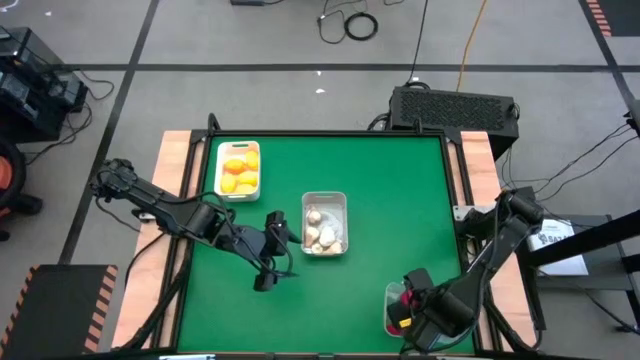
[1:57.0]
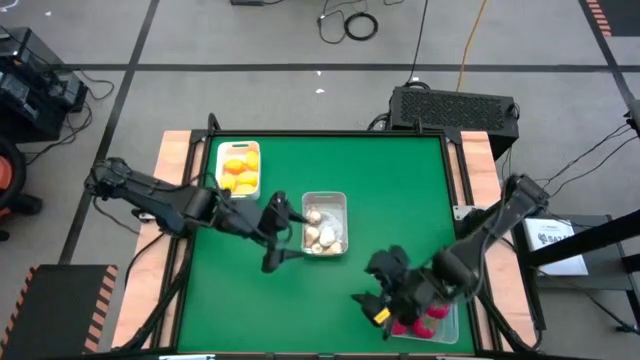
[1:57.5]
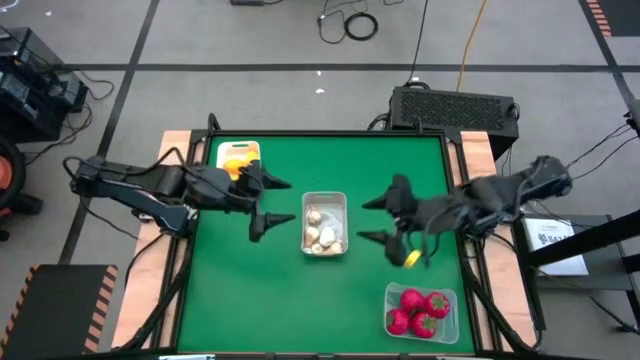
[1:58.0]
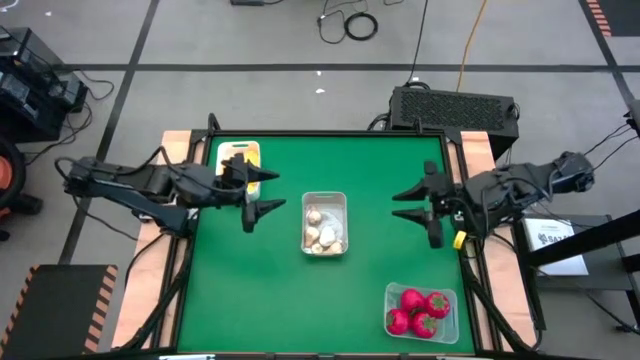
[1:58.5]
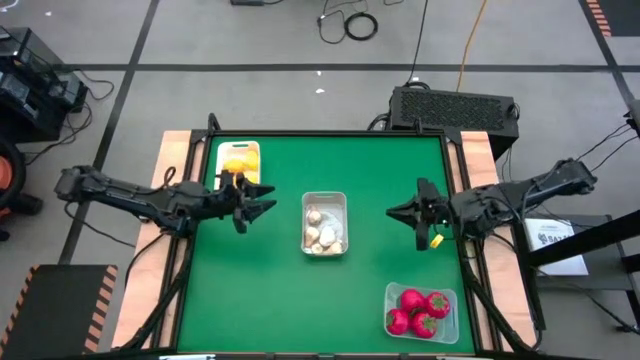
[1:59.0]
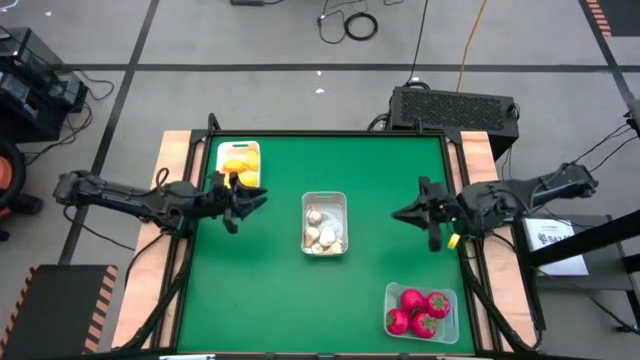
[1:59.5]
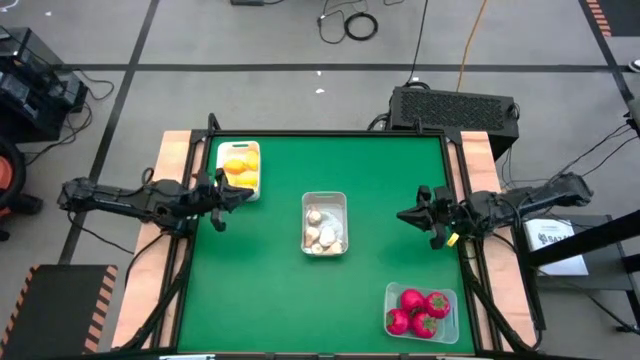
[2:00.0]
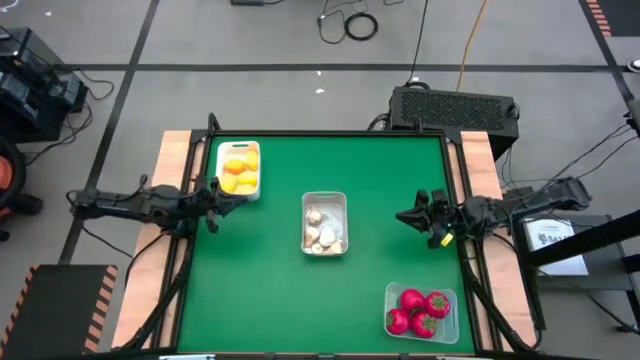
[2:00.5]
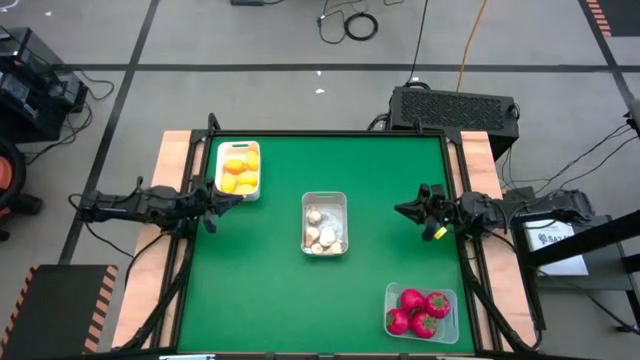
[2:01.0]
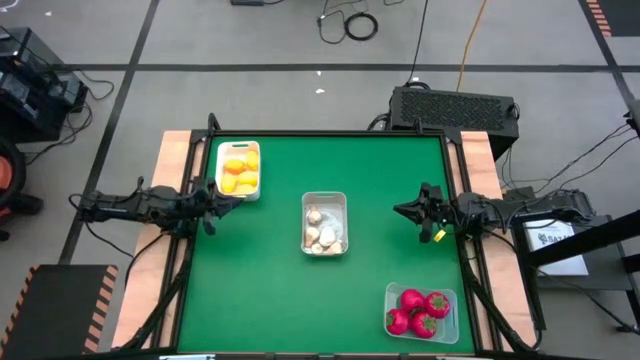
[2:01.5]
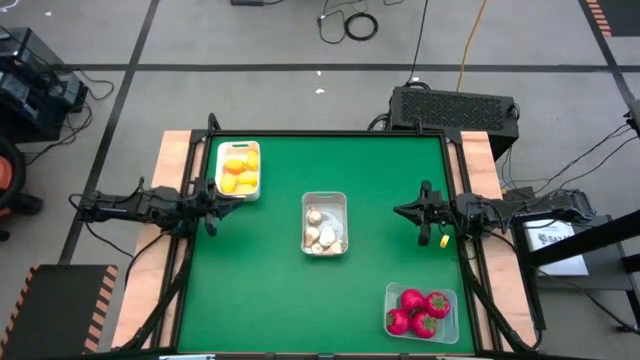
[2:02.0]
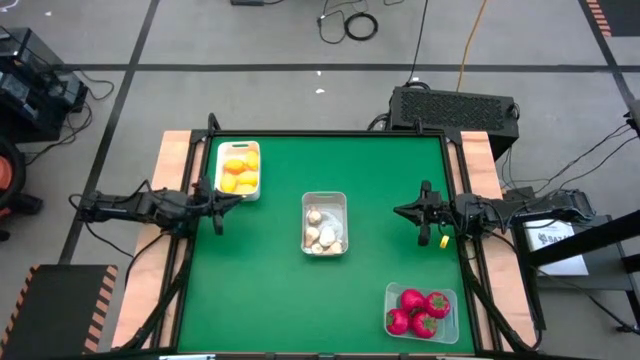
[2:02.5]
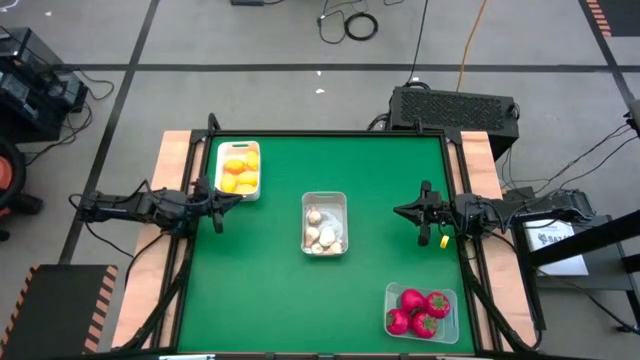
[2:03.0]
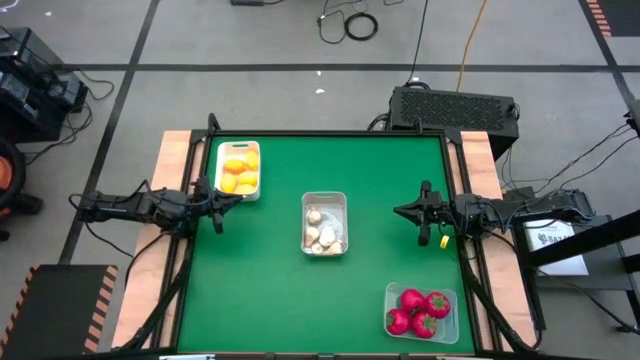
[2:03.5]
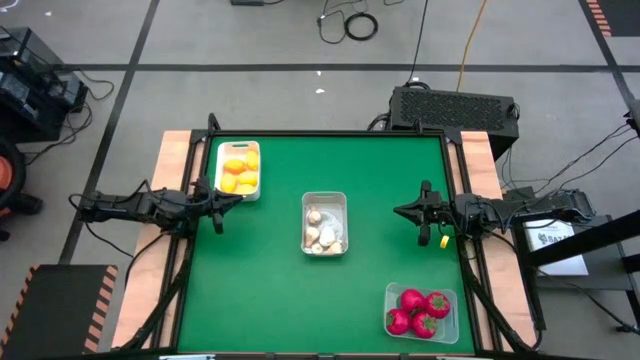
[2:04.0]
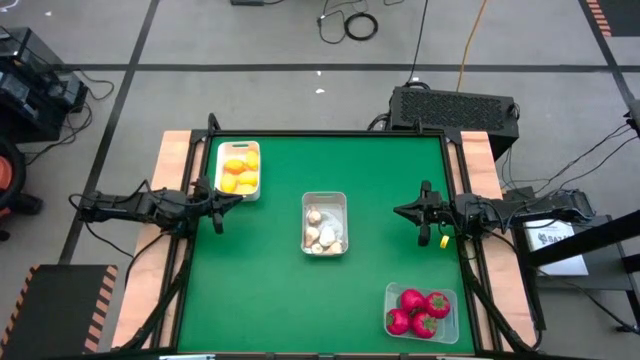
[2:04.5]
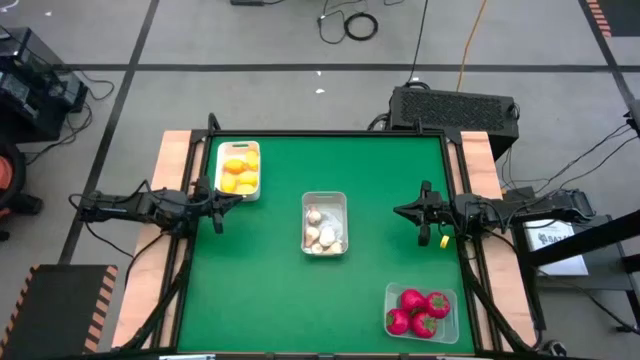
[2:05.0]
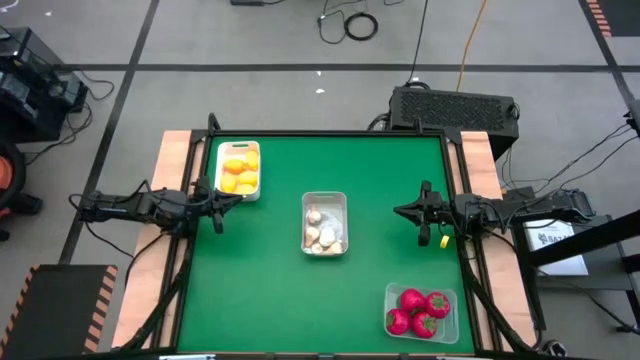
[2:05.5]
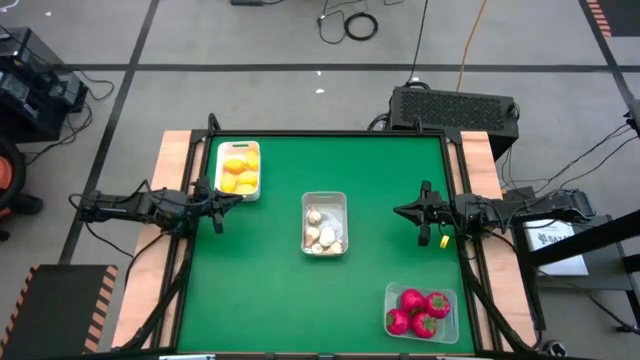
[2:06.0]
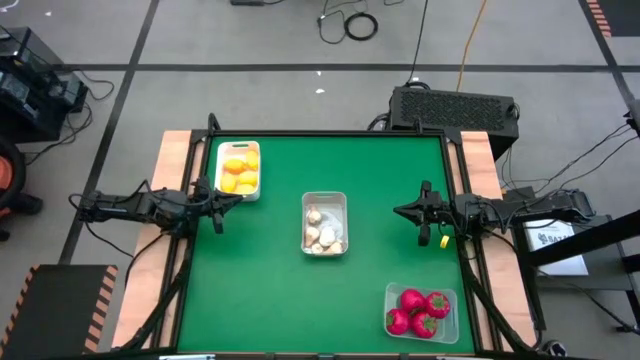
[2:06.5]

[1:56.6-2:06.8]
Task: Sort produce into baskets
Return to Home Position

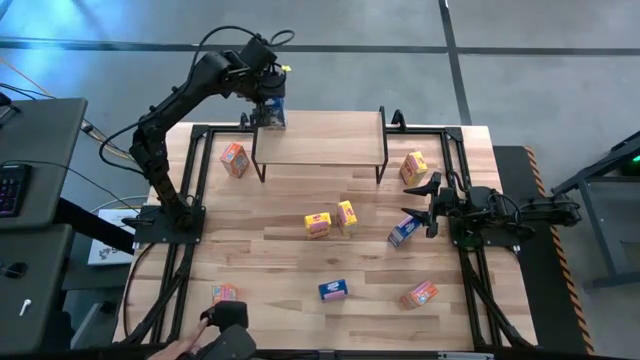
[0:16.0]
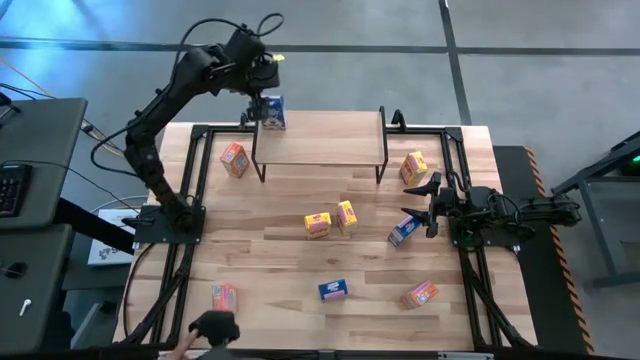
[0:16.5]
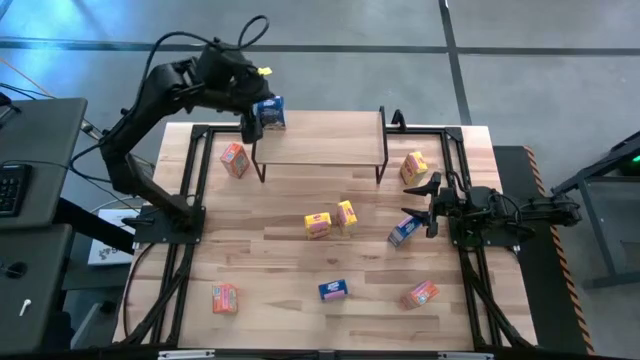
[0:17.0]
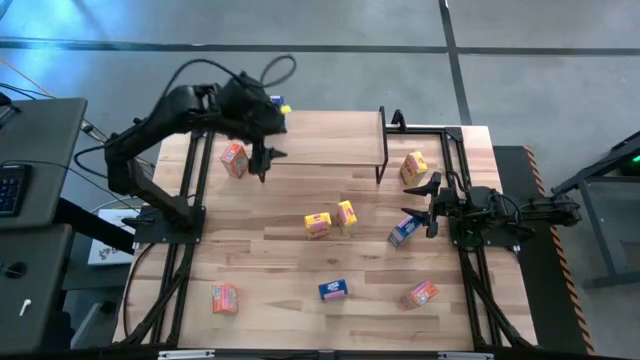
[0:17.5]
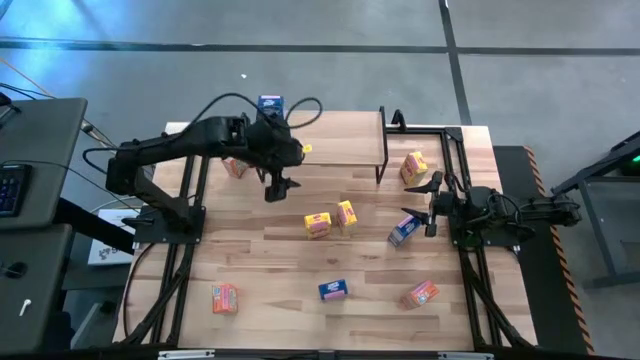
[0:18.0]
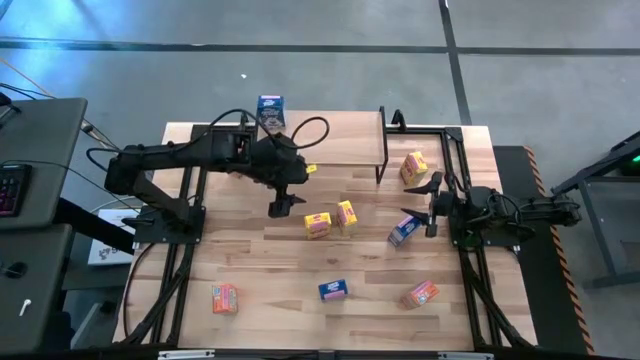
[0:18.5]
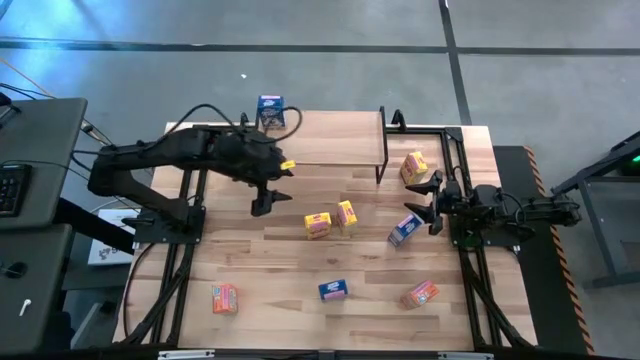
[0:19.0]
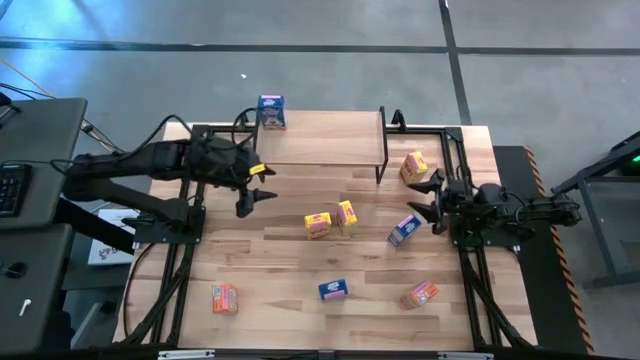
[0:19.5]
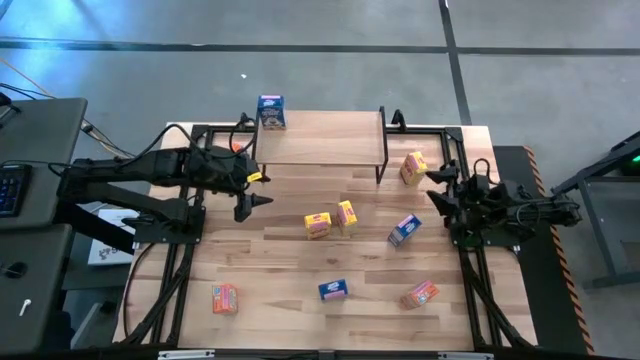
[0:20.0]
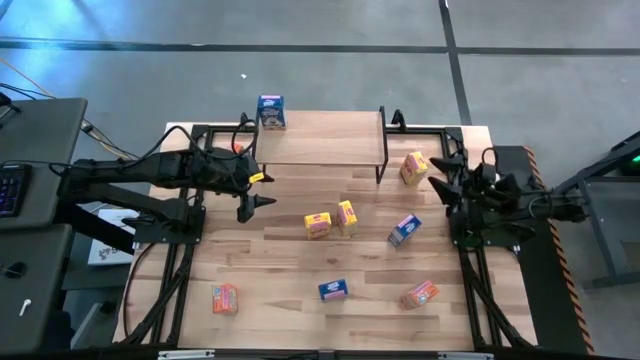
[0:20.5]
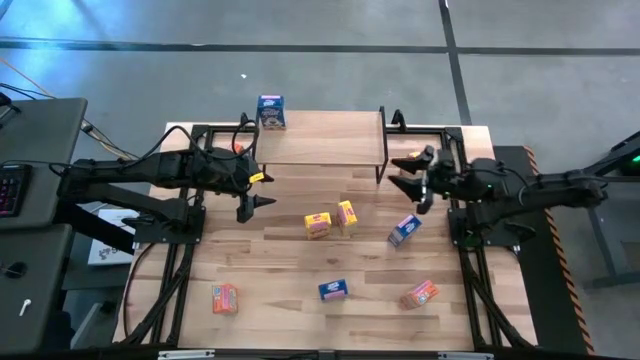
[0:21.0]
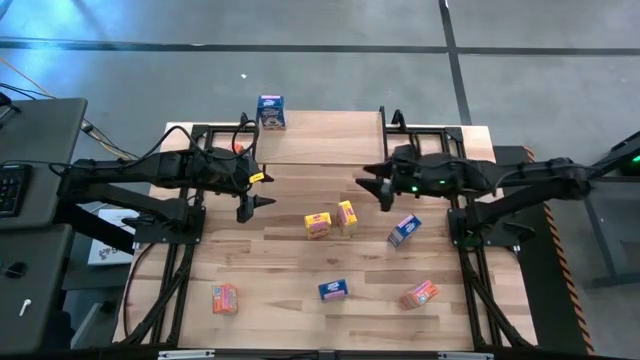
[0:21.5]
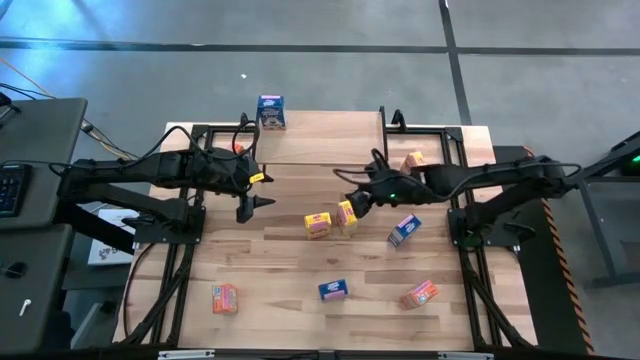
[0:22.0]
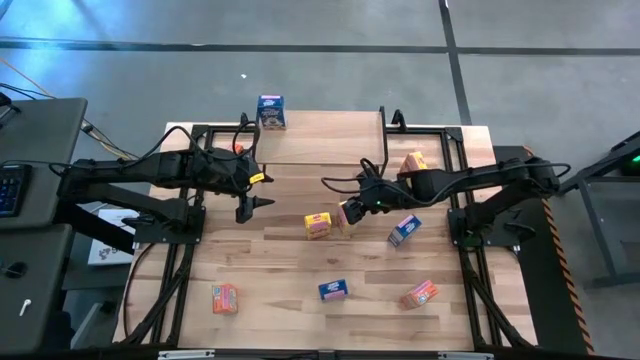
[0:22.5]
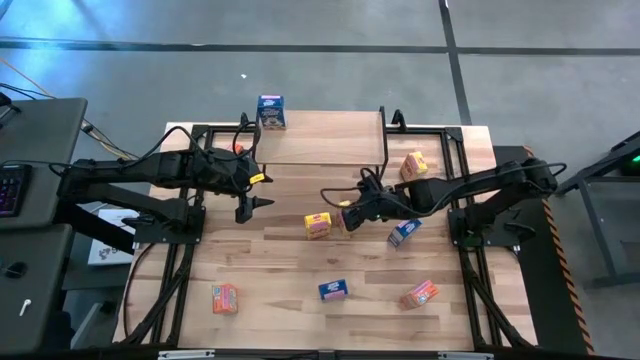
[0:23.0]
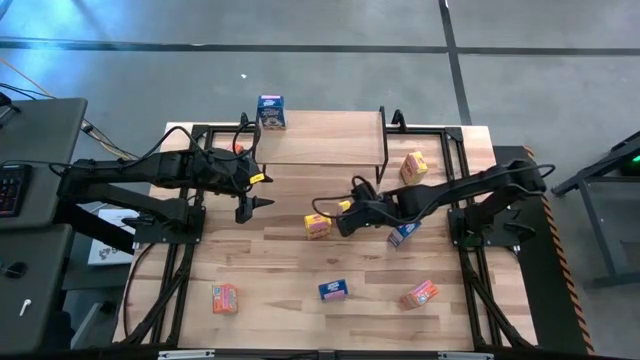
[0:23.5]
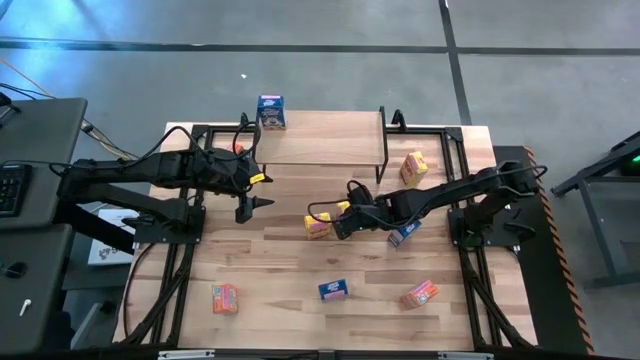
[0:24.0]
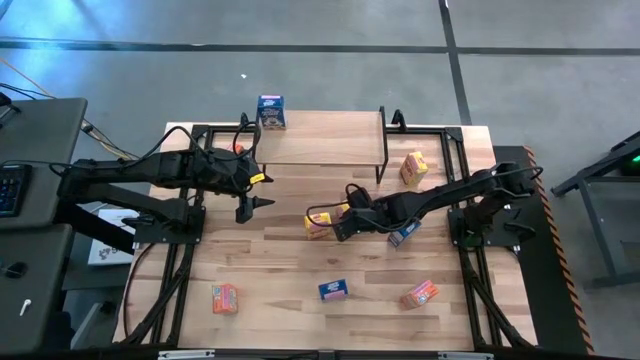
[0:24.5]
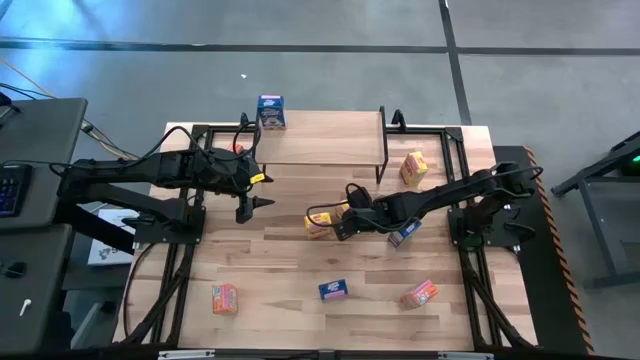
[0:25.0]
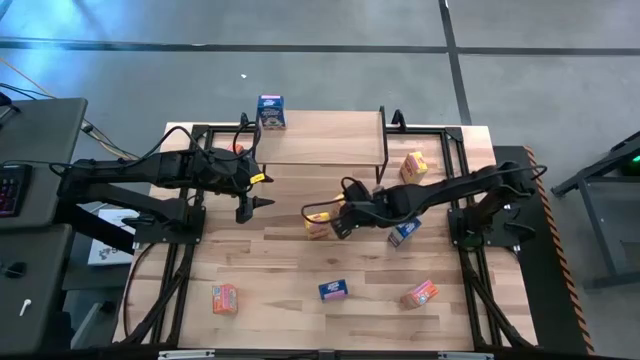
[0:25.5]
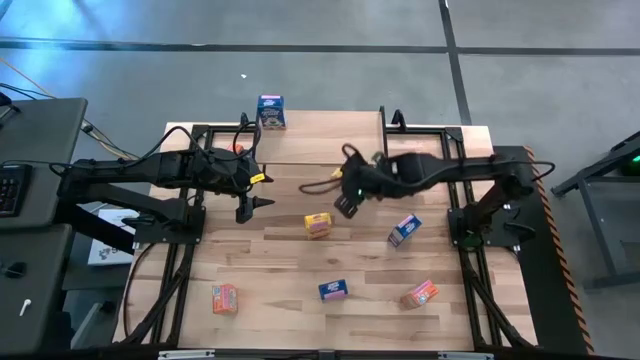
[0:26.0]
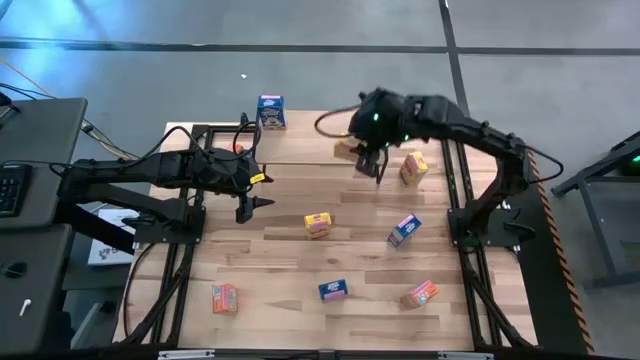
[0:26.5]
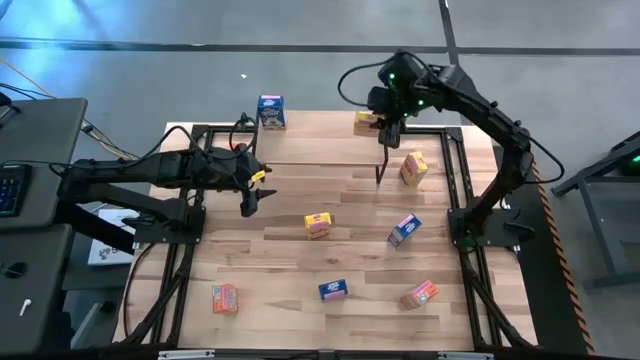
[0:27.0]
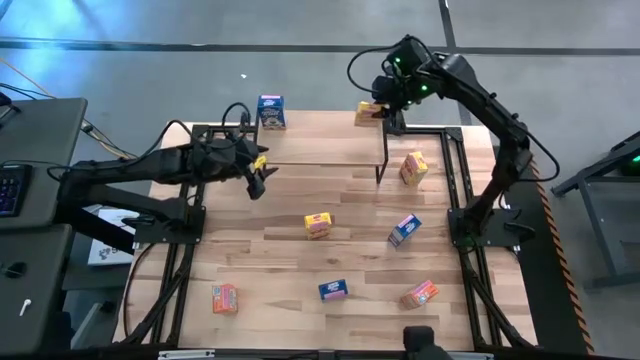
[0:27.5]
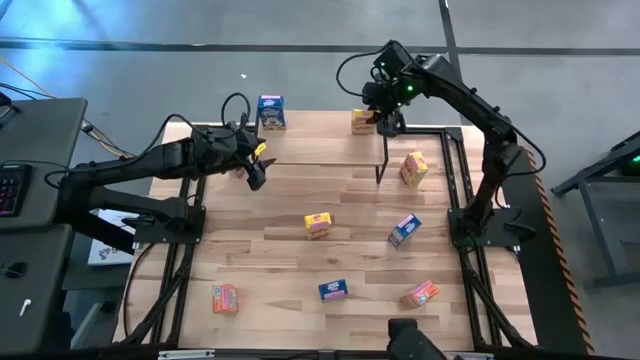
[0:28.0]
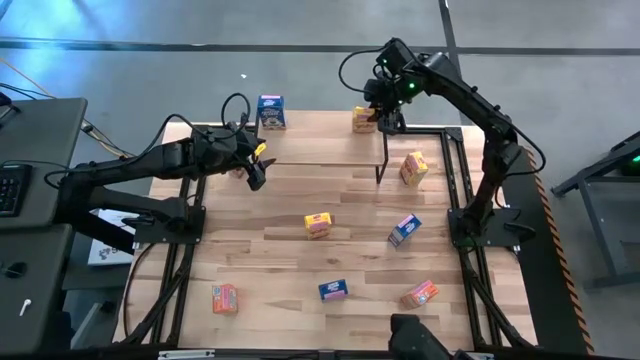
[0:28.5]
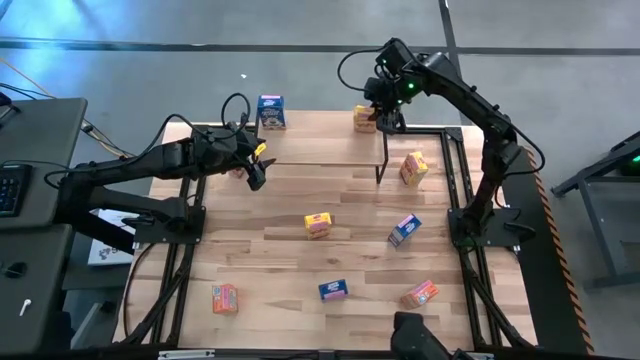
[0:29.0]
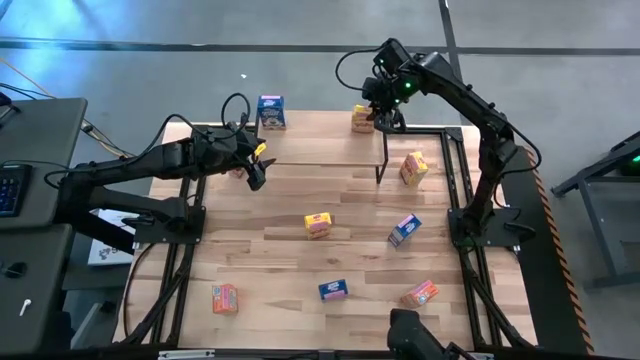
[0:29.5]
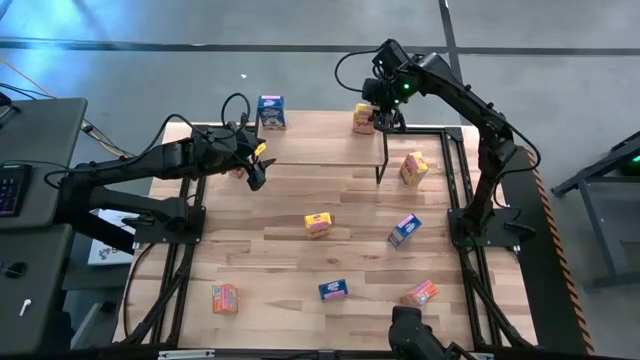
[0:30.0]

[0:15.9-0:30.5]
Task: Stack cereal on shelf
Put the bottom right yellow cereal box on the shelf
